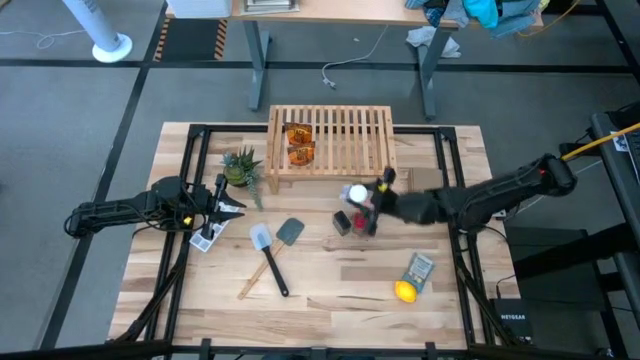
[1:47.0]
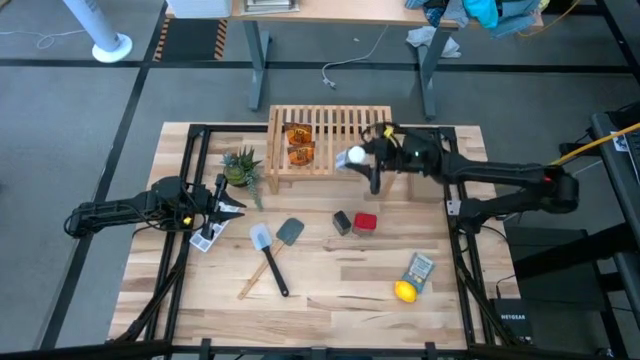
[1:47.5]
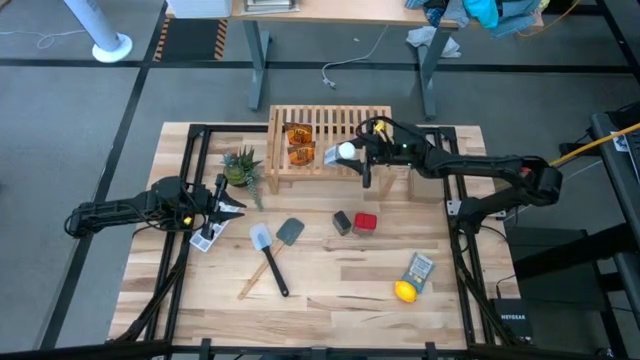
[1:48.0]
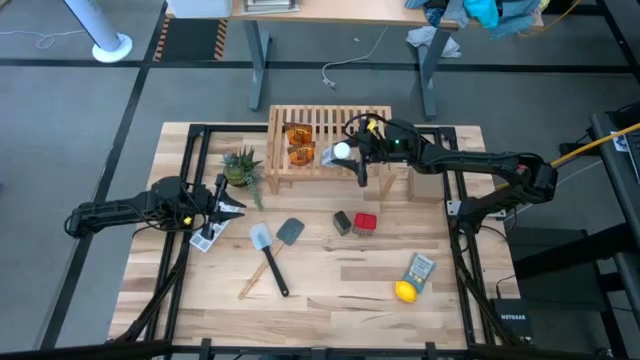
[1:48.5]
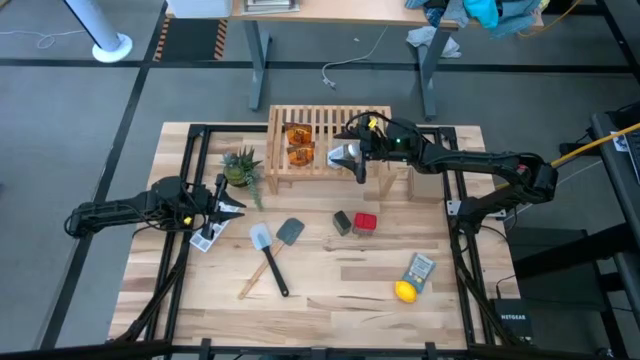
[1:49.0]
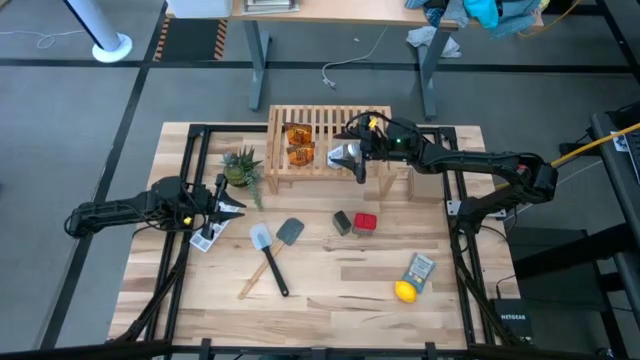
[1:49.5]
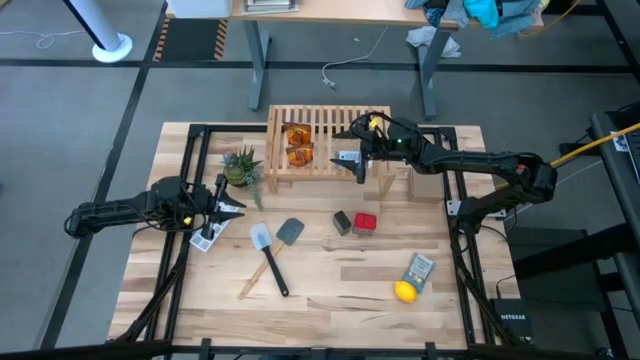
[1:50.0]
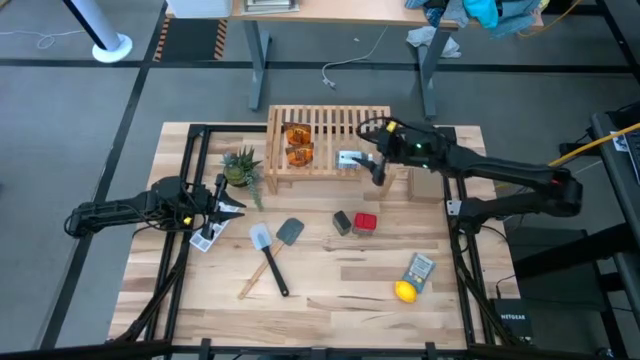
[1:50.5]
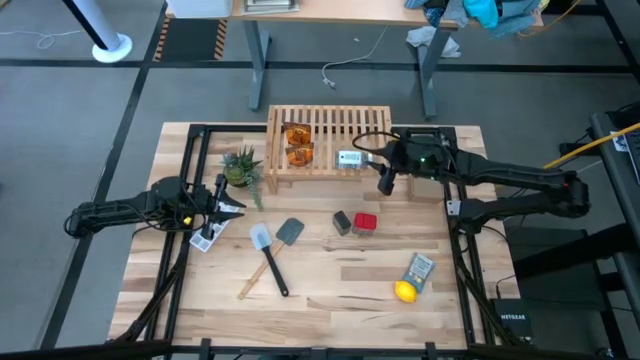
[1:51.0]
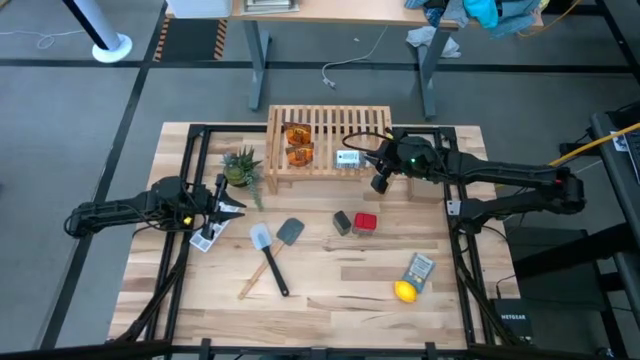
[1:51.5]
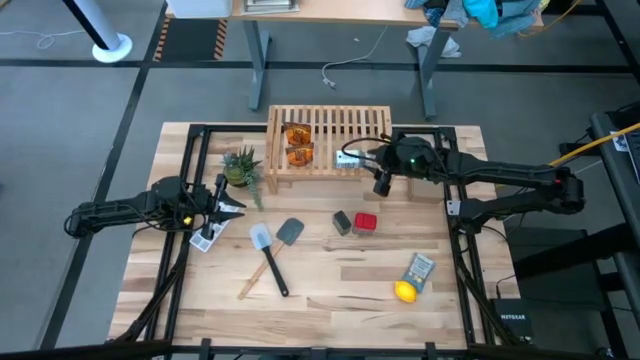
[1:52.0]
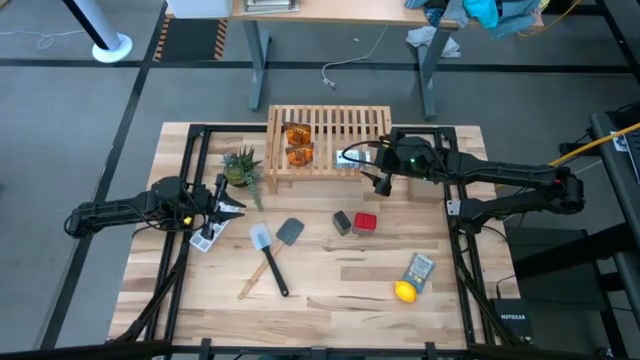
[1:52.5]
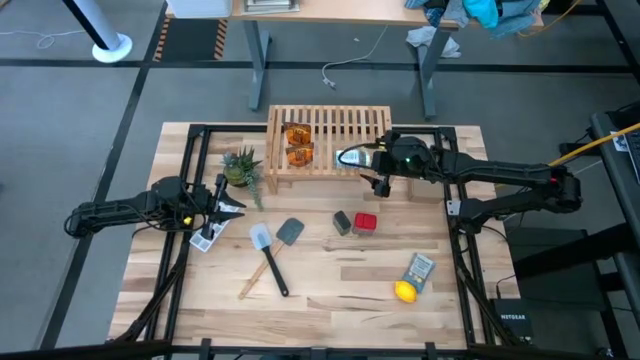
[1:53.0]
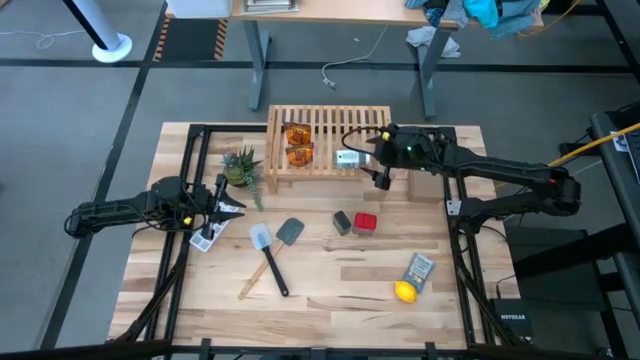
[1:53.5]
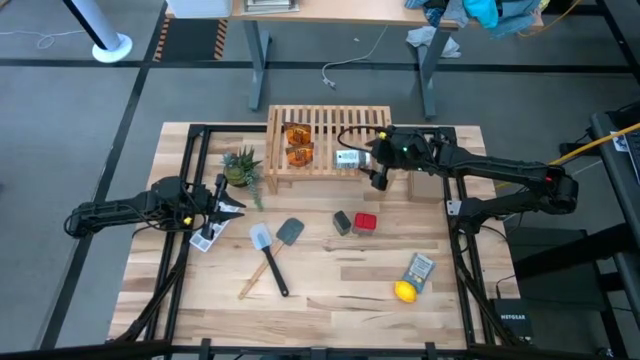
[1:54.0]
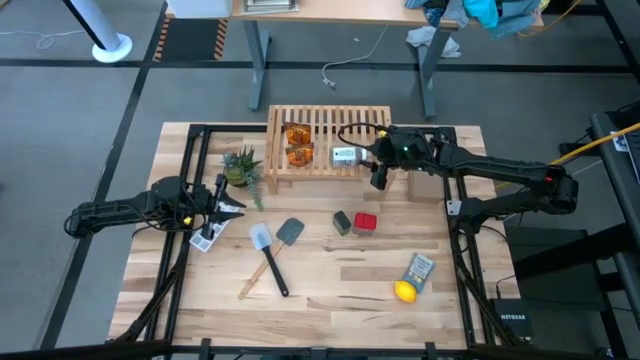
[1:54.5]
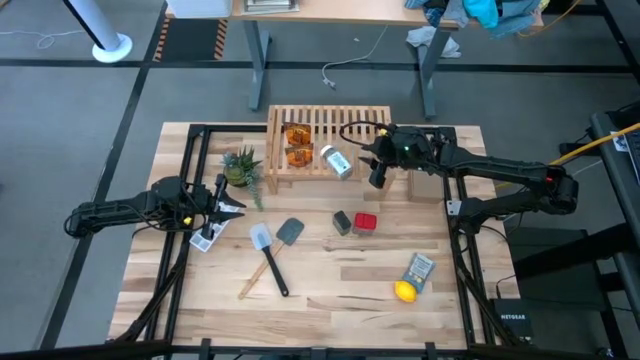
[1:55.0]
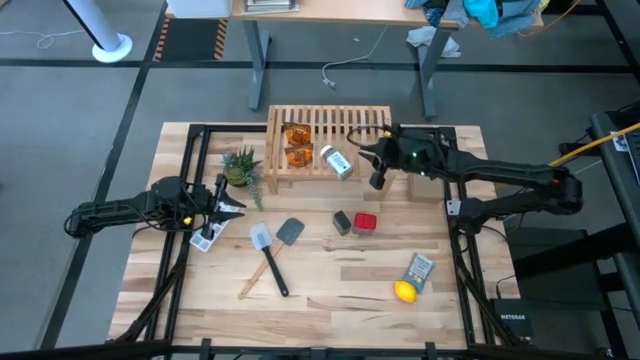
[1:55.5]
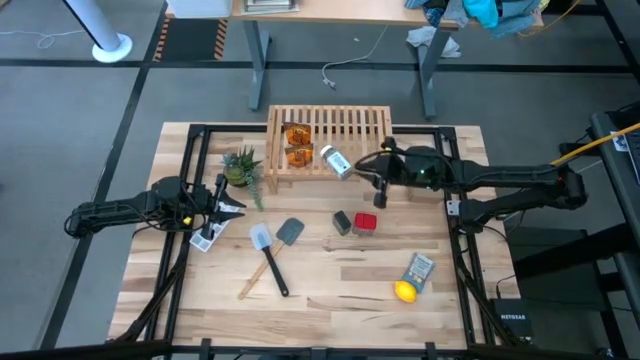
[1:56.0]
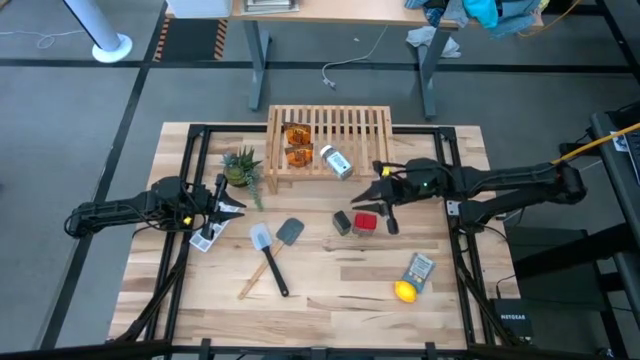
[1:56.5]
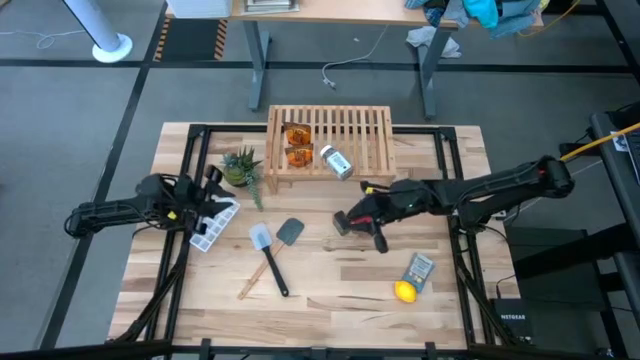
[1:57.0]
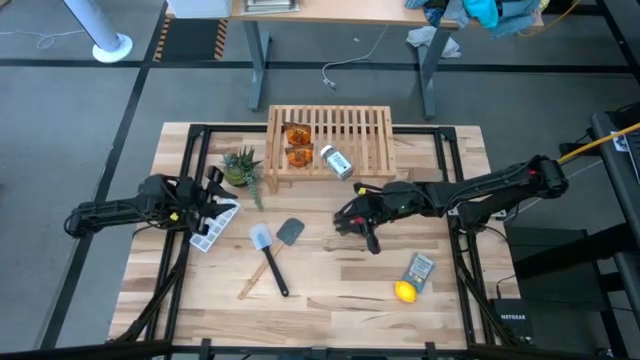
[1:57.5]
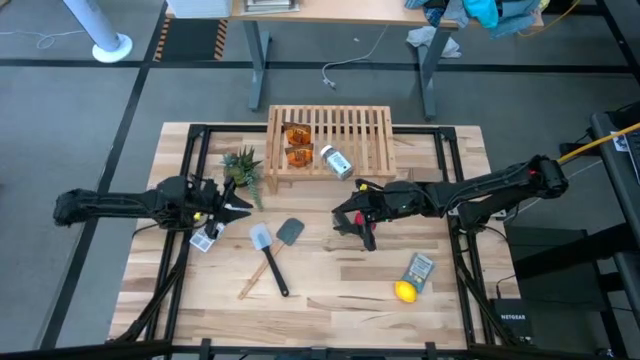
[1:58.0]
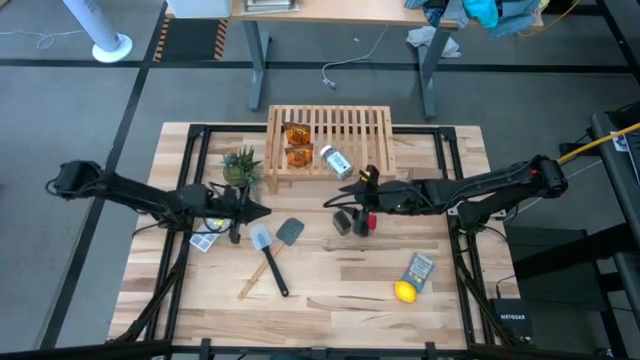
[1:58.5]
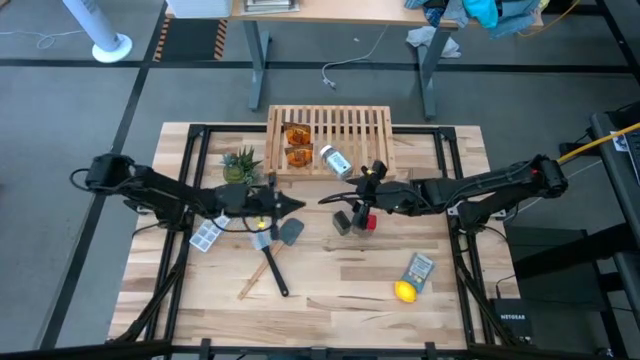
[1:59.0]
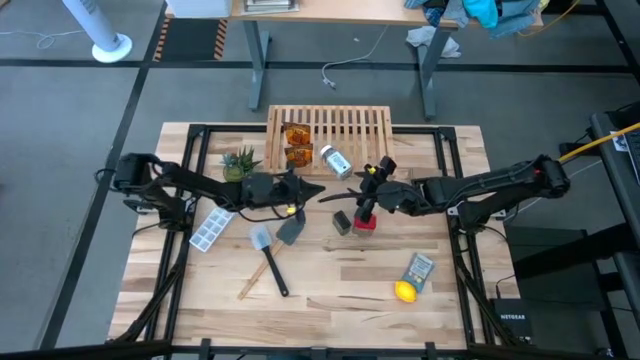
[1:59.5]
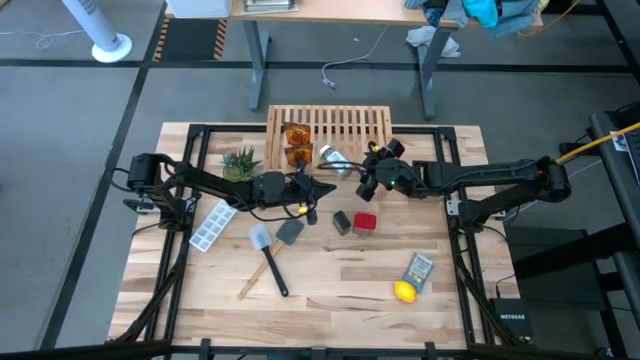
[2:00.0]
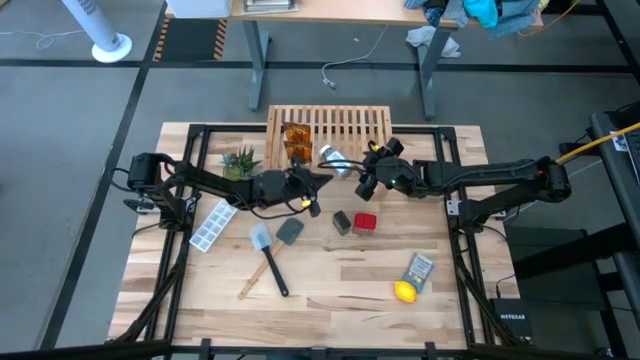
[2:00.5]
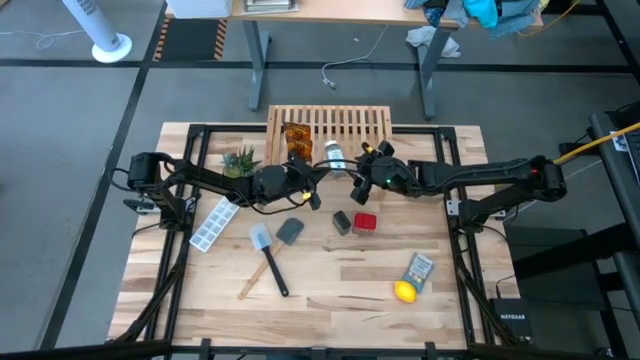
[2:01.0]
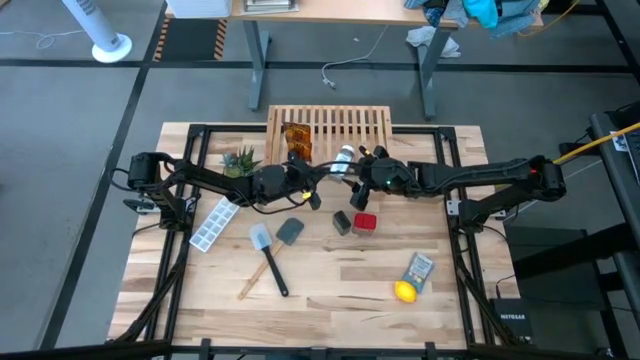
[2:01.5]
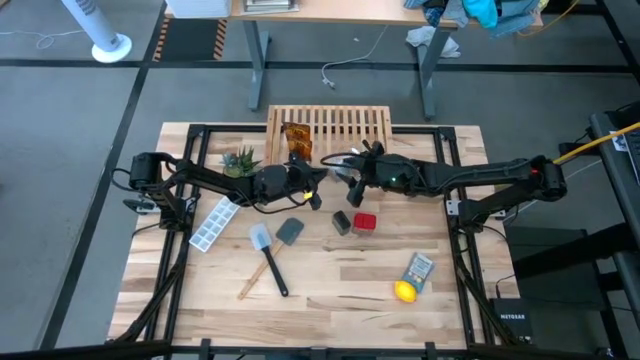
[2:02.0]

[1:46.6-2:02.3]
Task: Shelf spices
Put the white seasoning bottle on the shelf
